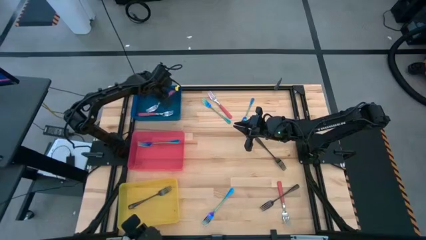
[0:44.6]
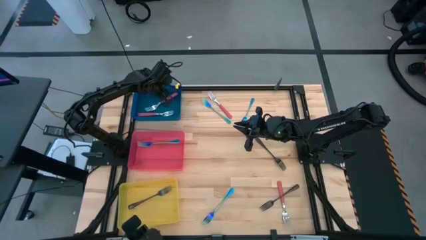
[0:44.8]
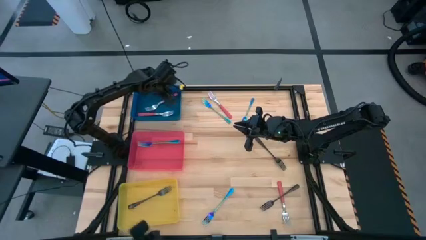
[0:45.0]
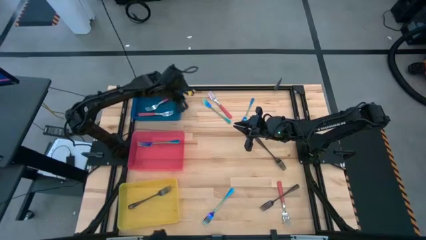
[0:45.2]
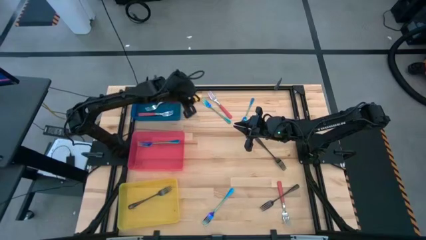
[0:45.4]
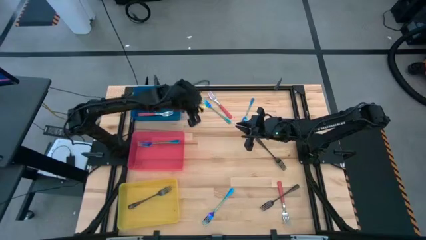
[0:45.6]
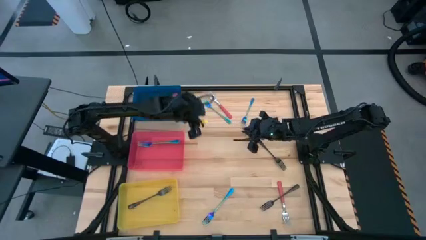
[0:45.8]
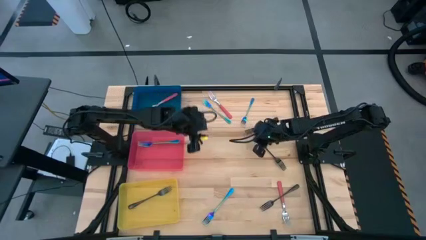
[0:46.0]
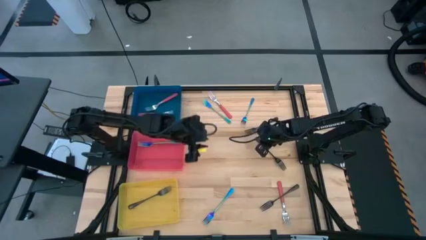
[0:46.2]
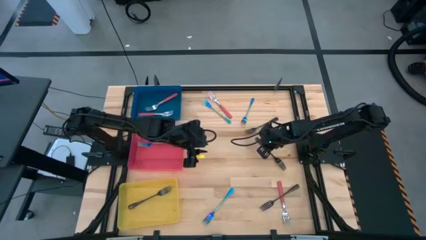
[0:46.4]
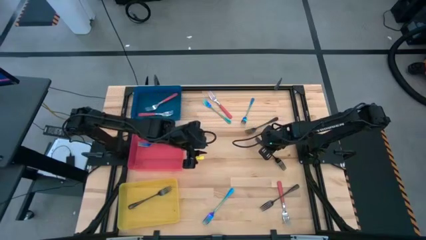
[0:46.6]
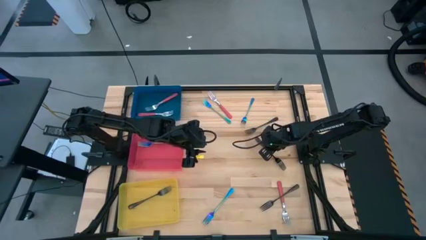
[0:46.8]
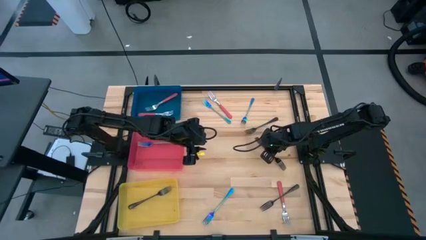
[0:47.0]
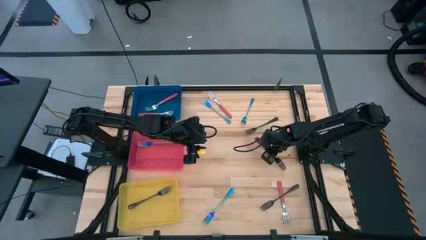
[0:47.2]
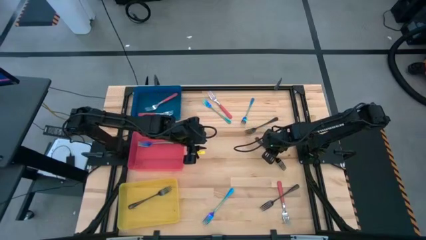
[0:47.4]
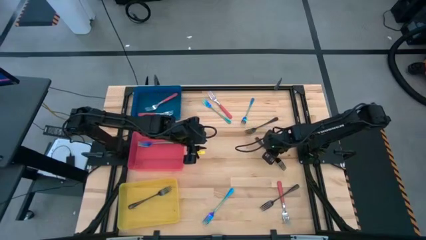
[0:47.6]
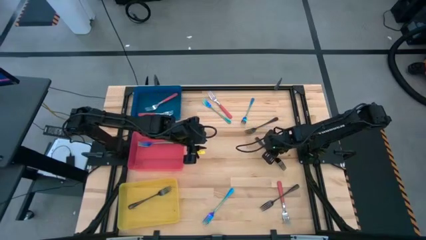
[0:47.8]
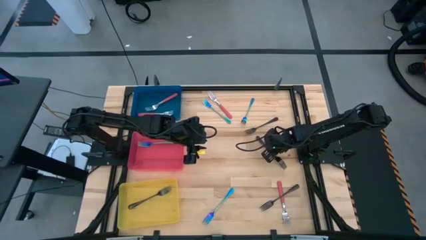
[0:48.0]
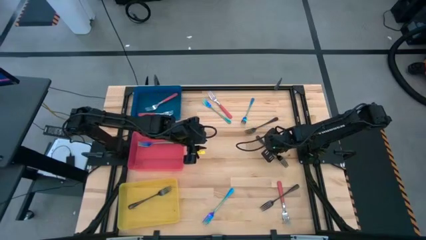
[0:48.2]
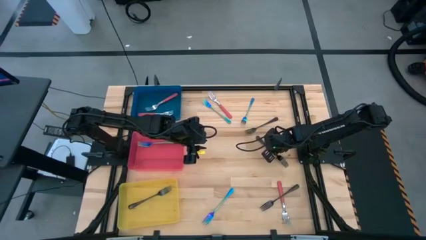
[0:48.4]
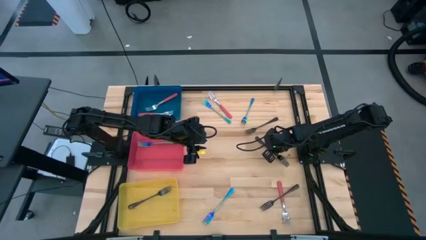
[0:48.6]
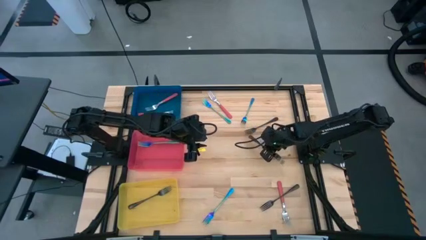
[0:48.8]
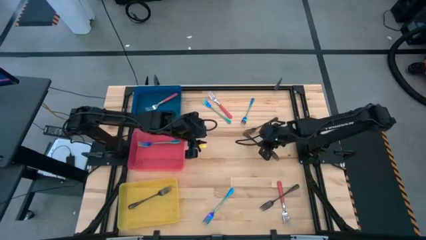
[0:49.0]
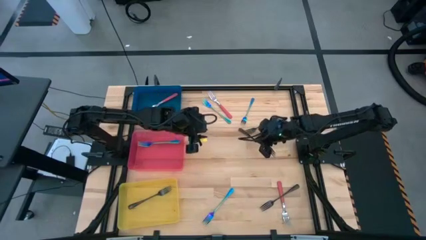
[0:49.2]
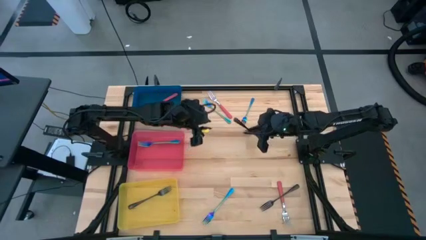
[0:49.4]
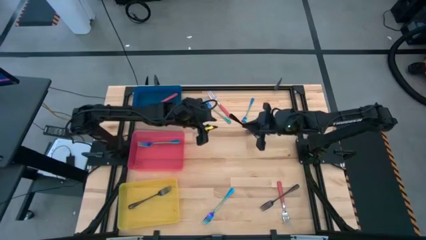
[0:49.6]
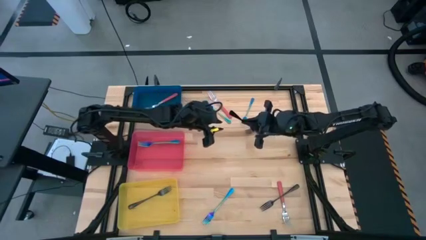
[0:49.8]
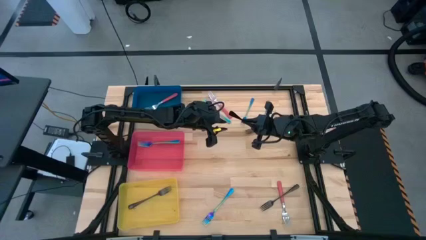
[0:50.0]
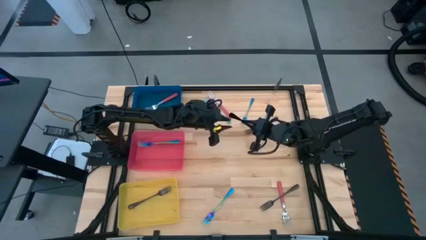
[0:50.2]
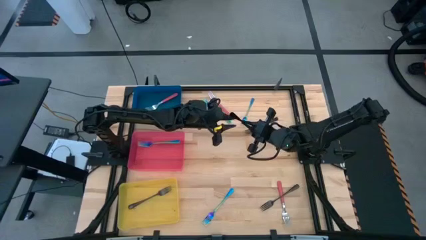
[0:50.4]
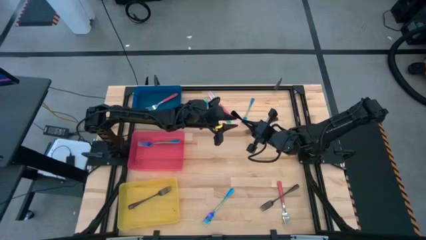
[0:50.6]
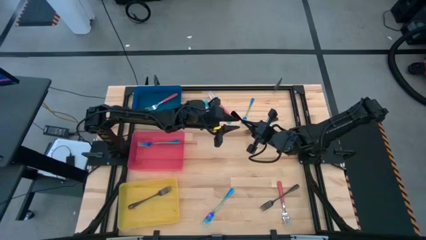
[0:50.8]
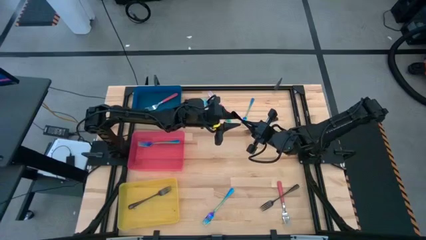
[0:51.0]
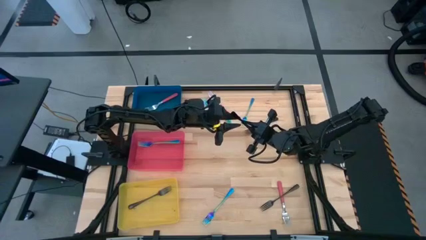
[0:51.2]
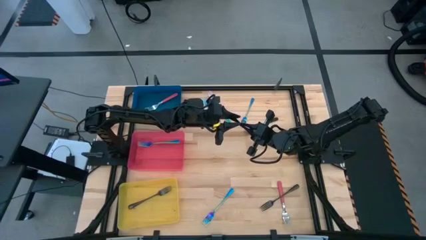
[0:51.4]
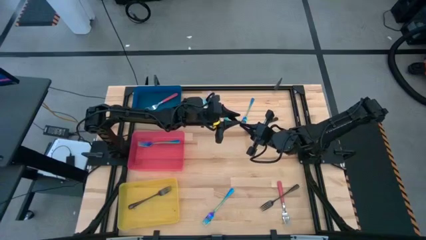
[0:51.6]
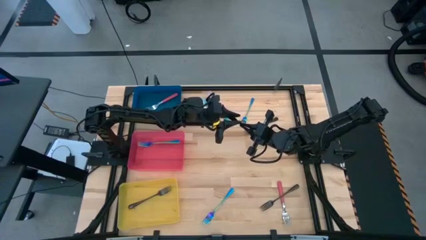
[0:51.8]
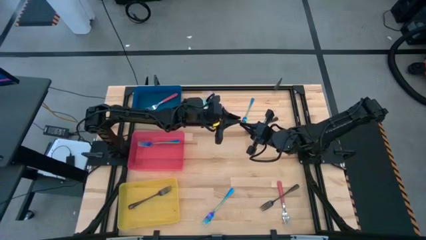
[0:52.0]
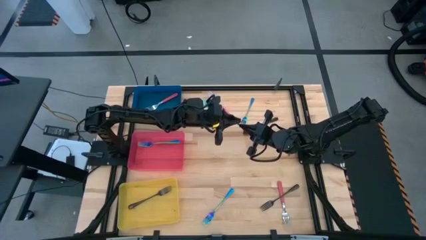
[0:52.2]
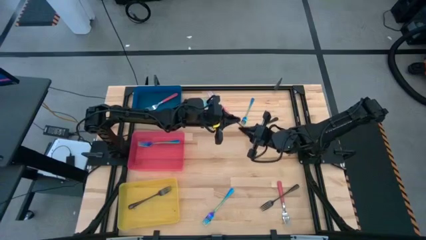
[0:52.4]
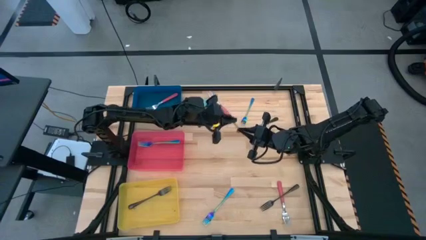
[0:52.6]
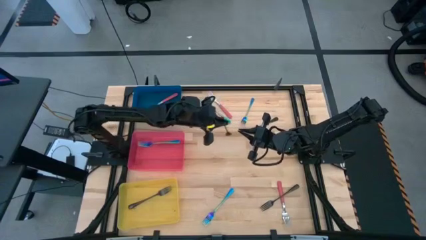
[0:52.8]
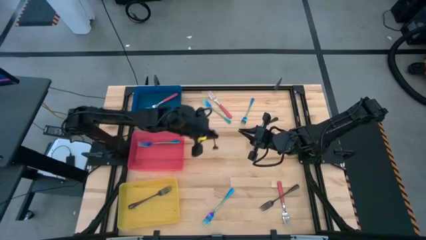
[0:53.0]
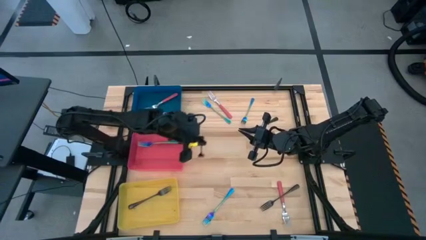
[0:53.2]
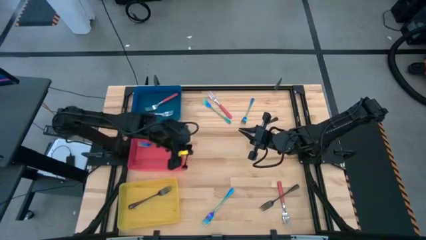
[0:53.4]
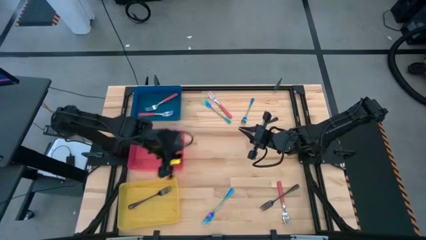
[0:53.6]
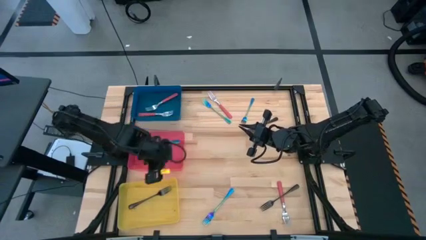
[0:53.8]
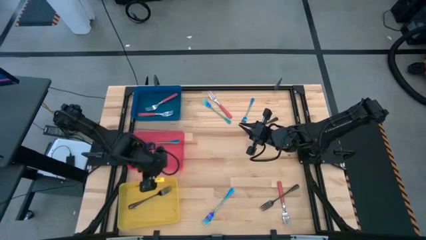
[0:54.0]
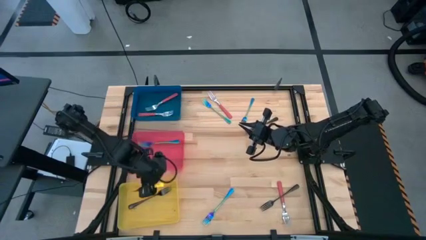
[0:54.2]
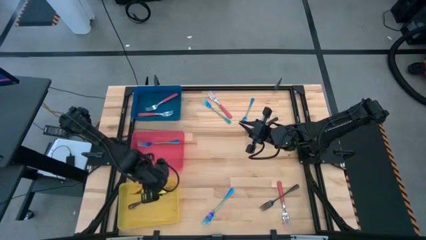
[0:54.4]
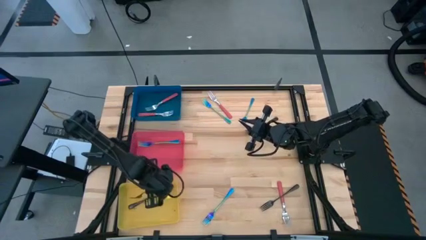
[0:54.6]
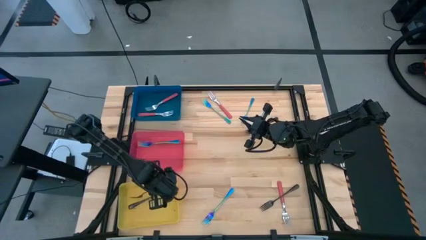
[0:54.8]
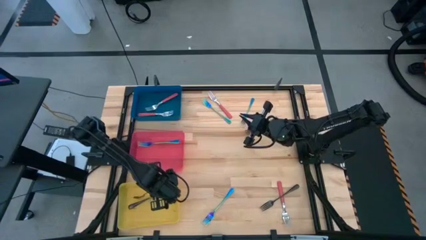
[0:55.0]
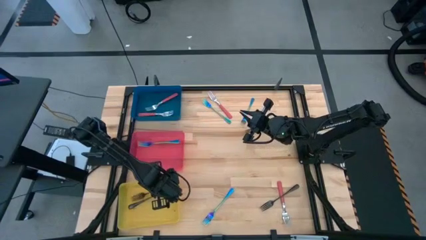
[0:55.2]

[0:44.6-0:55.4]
Task: Sort silverware by color (type)
Put the black fork into the yellow bin

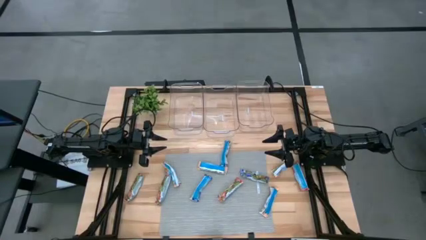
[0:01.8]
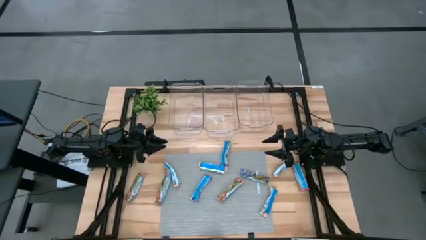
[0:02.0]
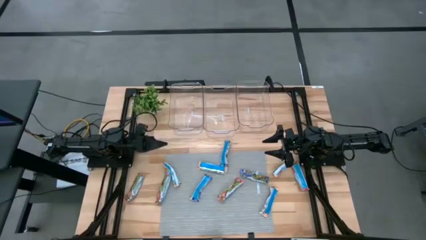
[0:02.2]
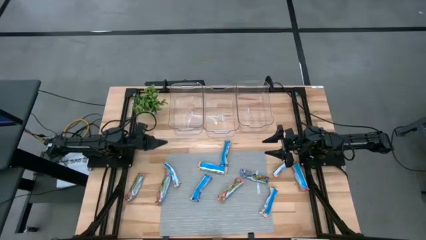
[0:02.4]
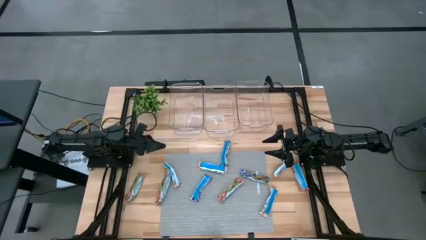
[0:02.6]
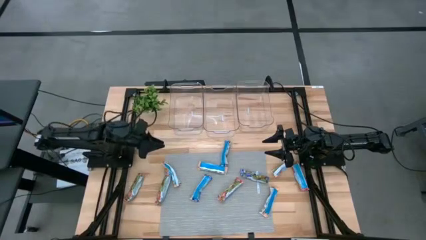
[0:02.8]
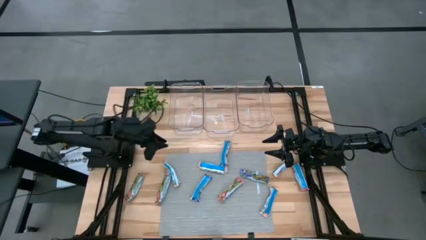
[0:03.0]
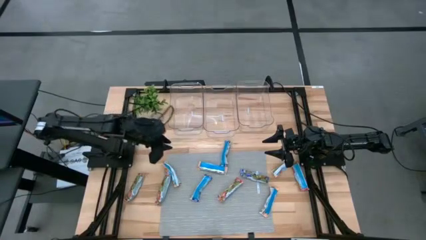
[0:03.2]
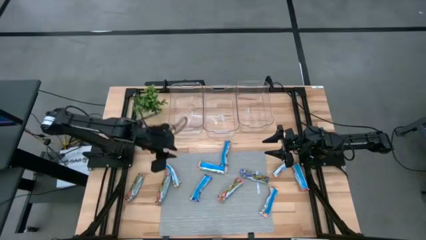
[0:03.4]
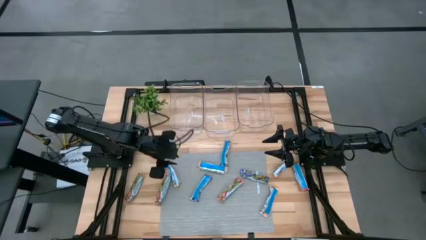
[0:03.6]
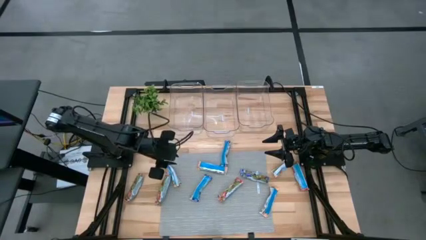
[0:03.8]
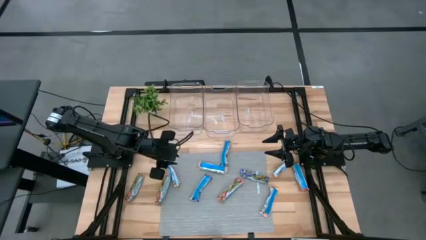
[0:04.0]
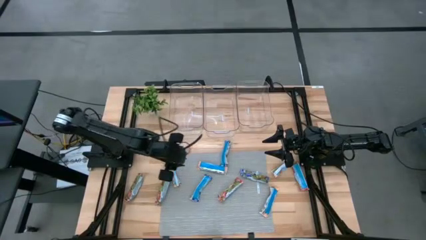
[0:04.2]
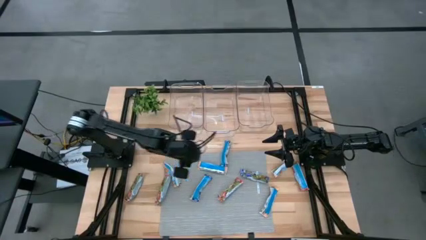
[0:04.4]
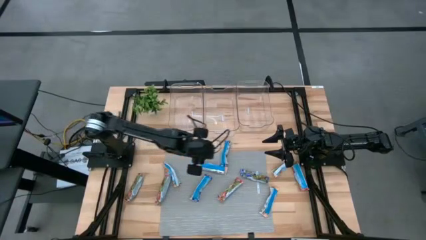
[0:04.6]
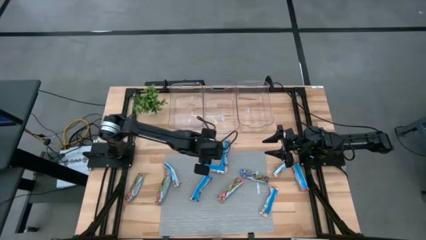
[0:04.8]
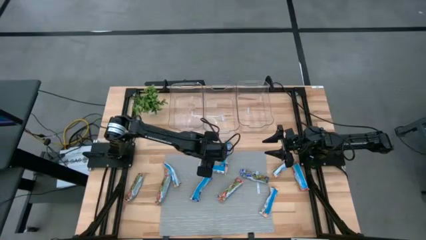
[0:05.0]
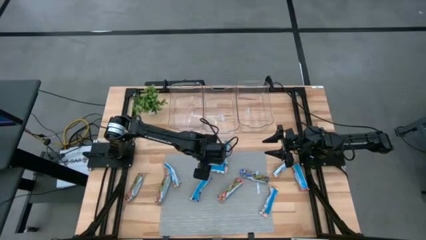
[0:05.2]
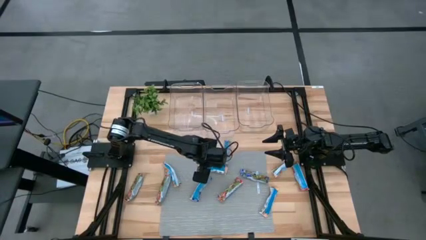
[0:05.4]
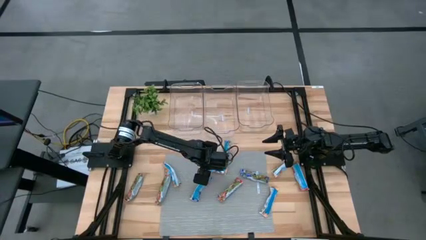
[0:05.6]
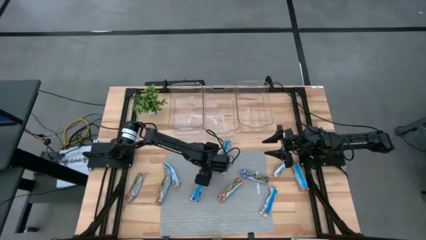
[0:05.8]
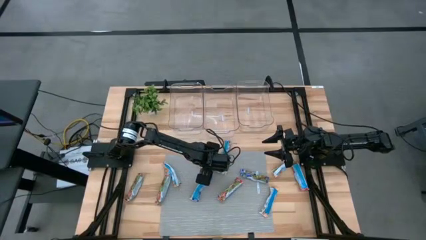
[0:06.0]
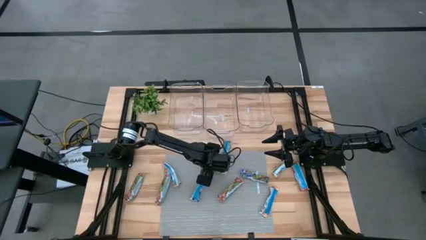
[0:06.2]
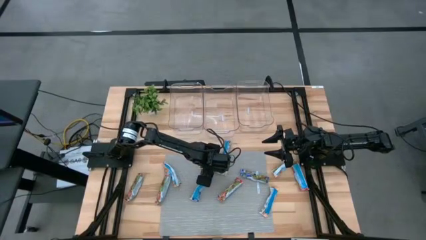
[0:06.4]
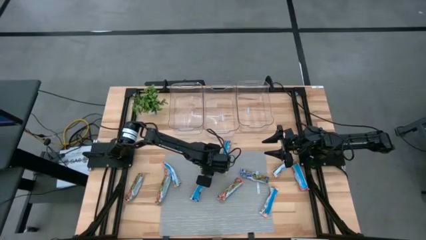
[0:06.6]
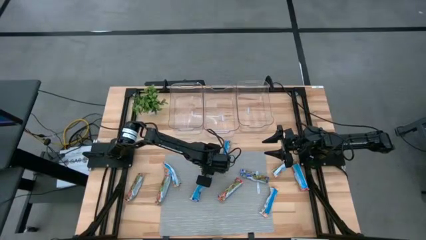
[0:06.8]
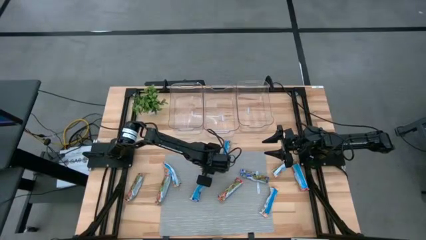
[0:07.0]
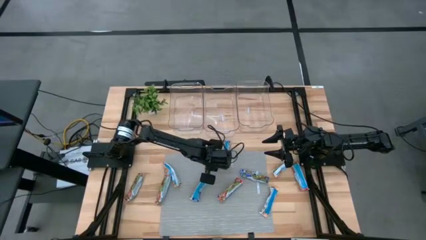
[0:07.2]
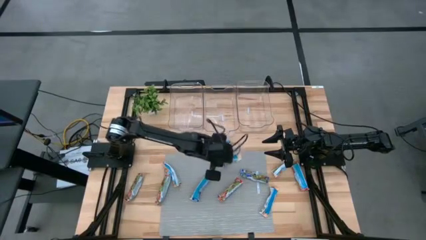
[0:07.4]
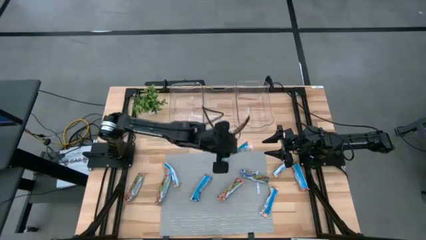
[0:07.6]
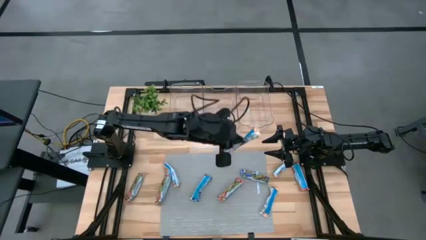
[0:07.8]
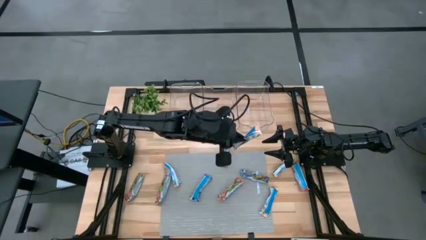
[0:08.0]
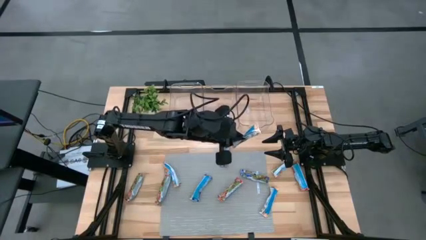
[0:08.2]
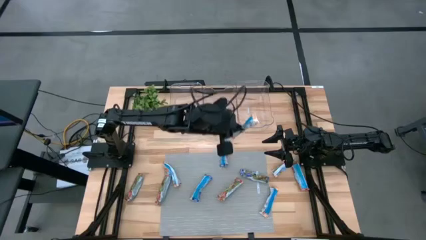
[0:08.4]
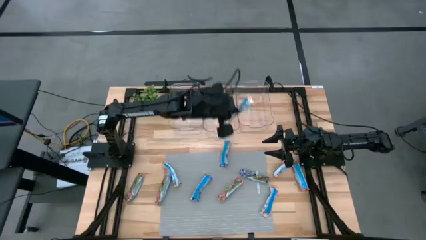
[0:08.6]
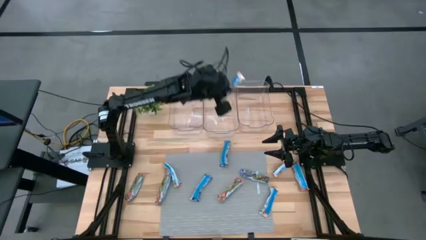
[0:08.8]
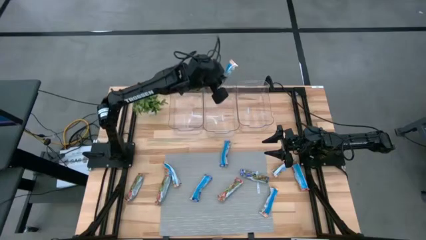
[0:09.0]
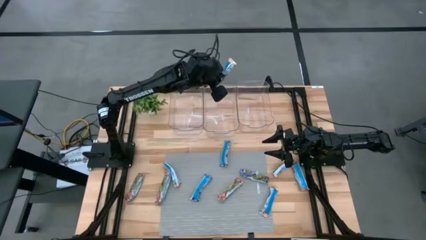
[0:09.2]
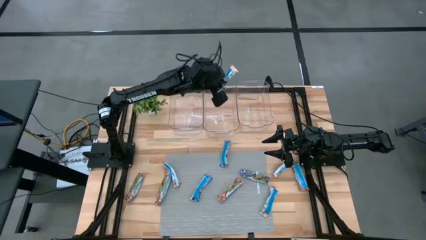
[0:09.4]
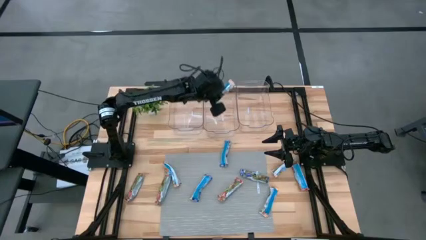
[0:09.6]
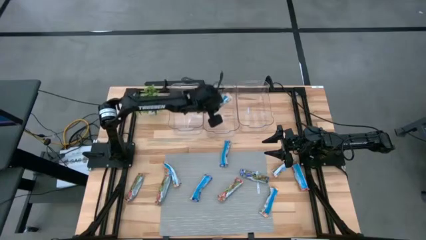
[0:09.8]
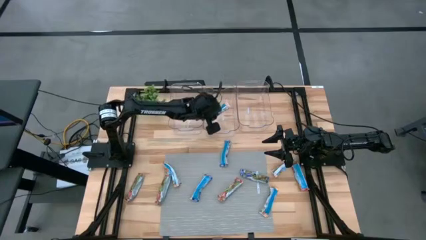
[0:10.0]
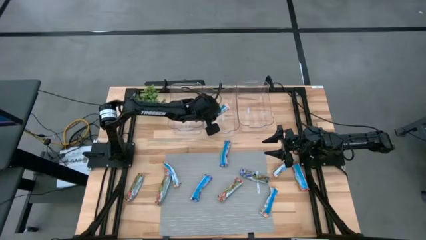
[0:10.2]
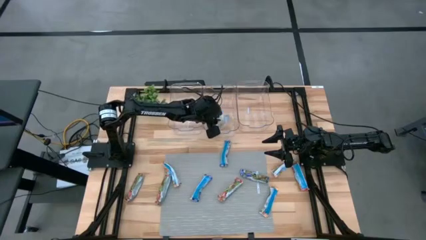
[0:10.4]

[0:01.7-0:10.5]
Task: Pick and place Granola Bars by type
Put the yellow granola bar into the middle transparent bin
